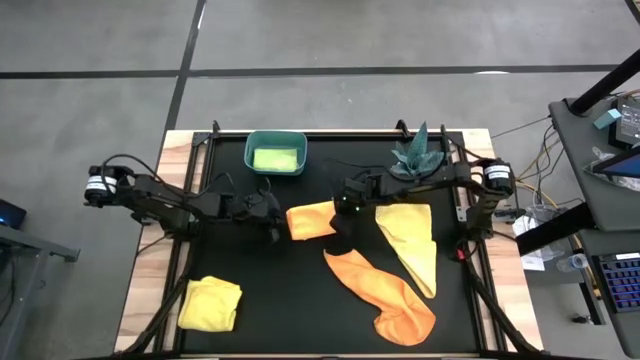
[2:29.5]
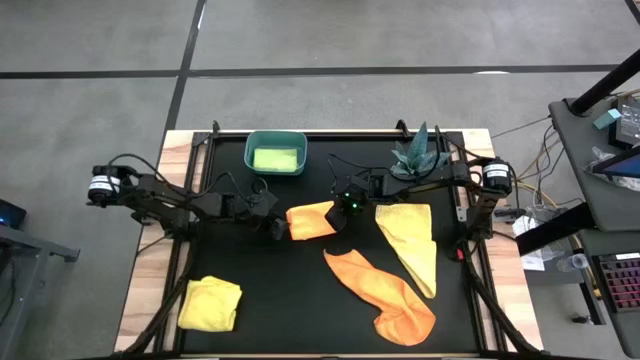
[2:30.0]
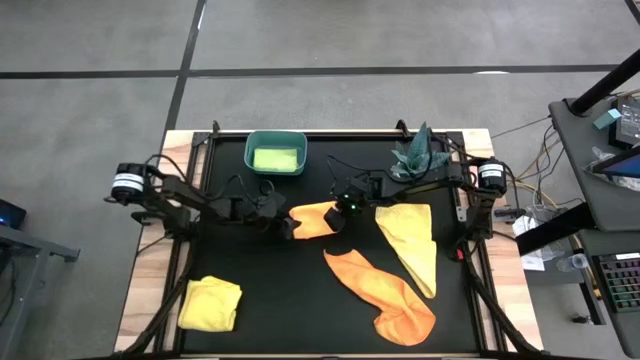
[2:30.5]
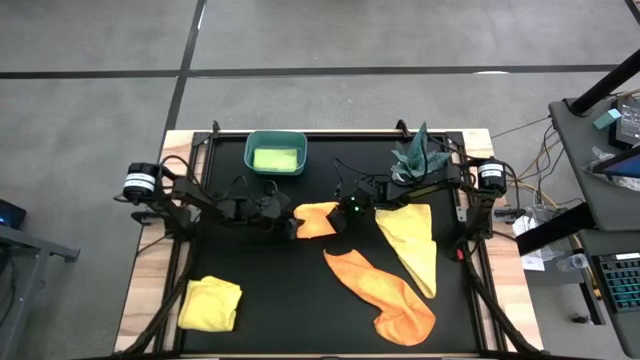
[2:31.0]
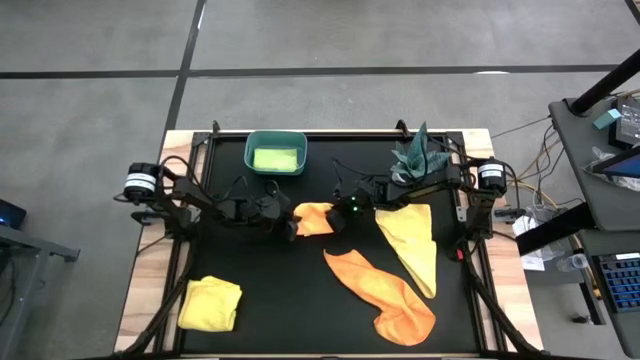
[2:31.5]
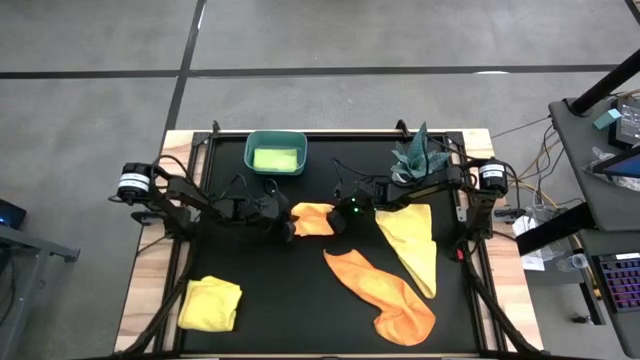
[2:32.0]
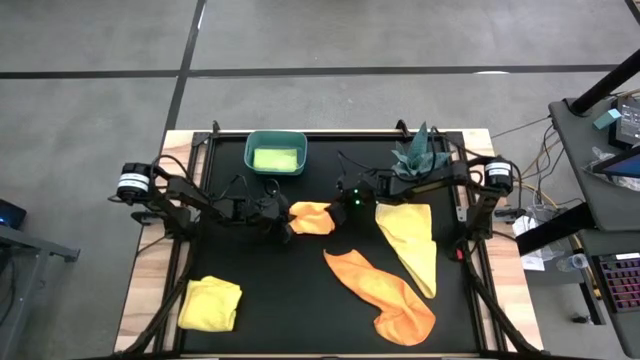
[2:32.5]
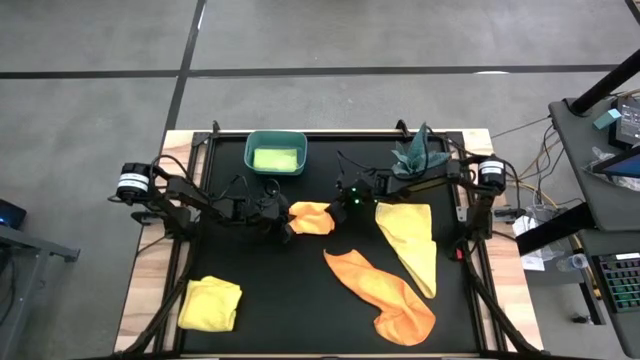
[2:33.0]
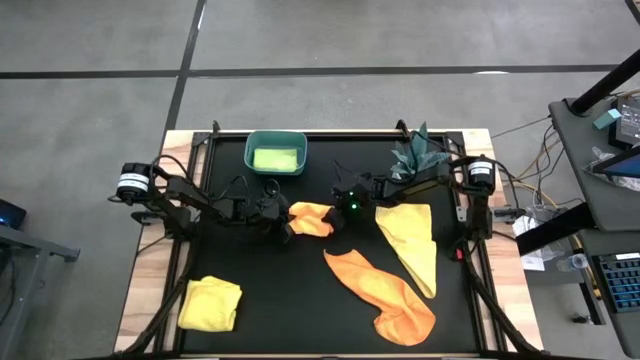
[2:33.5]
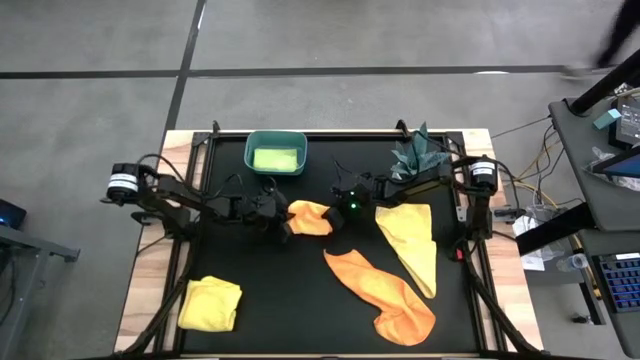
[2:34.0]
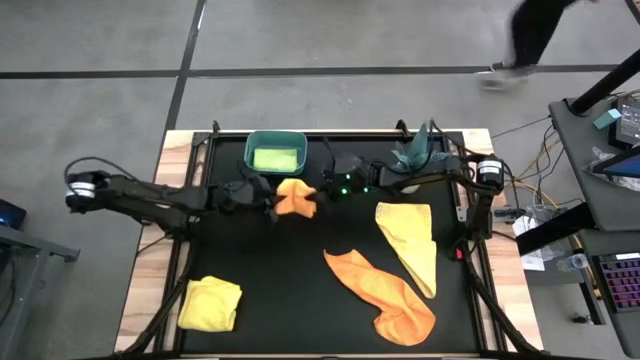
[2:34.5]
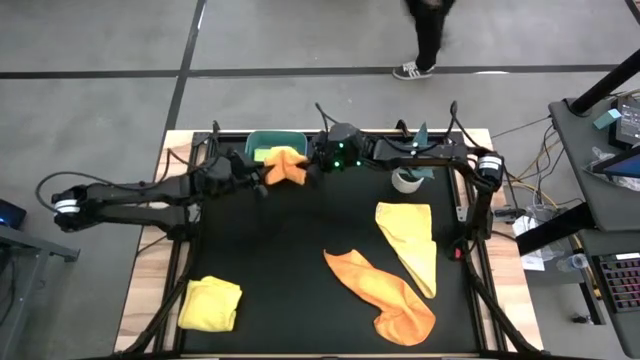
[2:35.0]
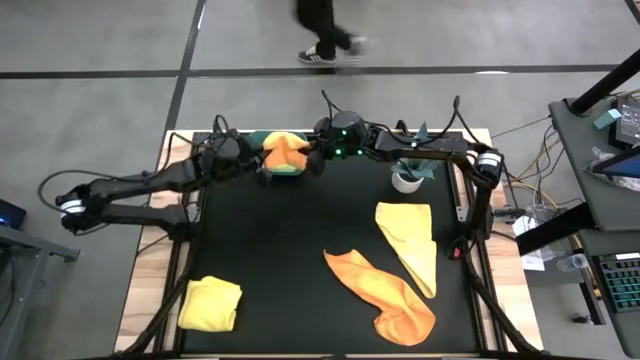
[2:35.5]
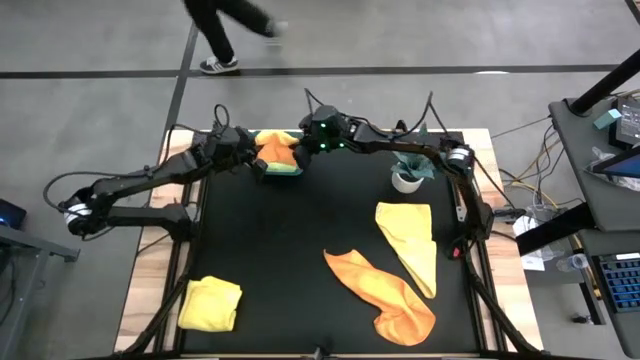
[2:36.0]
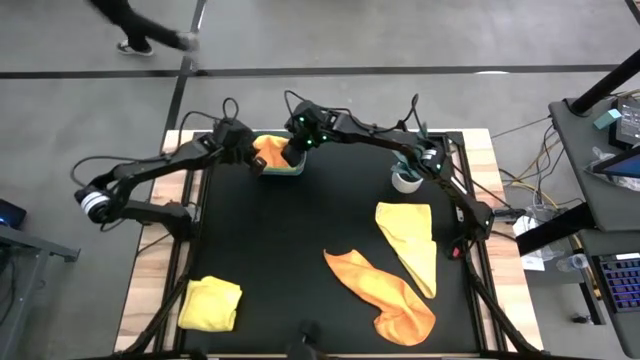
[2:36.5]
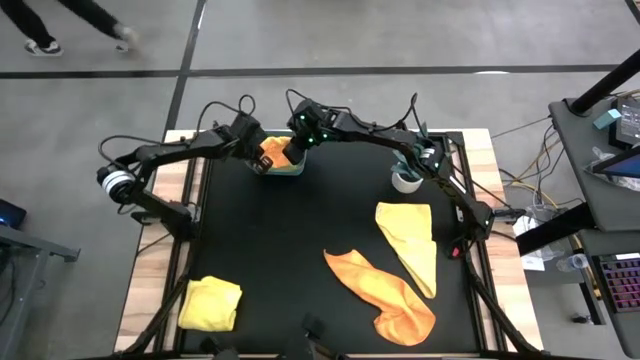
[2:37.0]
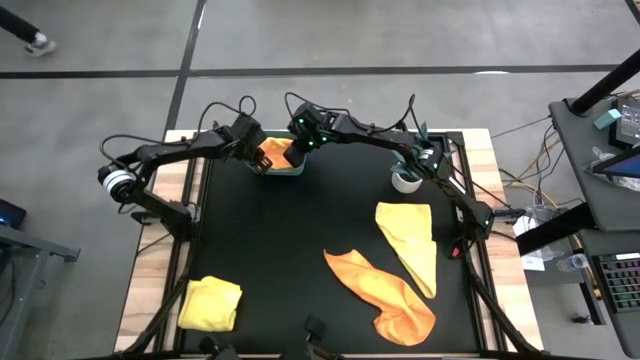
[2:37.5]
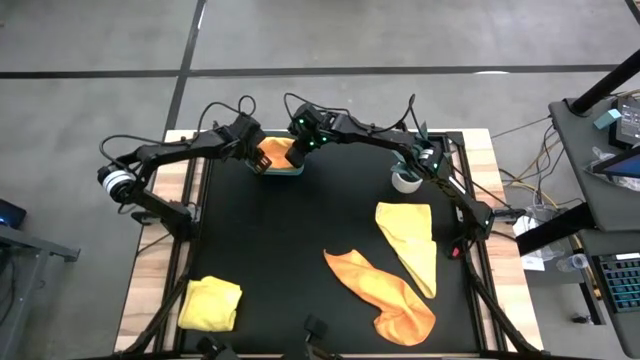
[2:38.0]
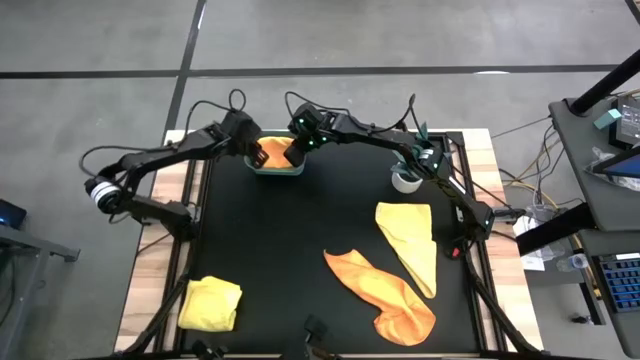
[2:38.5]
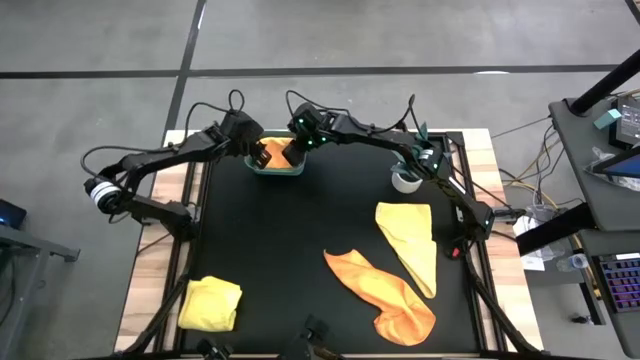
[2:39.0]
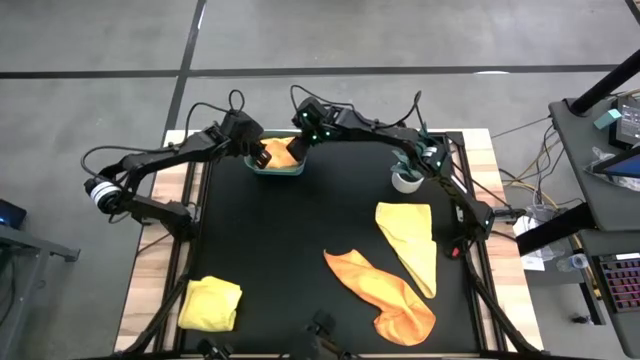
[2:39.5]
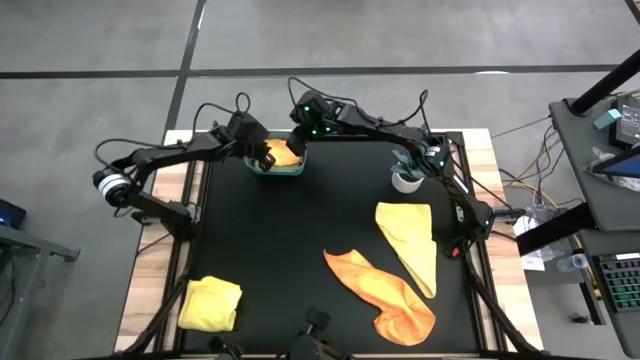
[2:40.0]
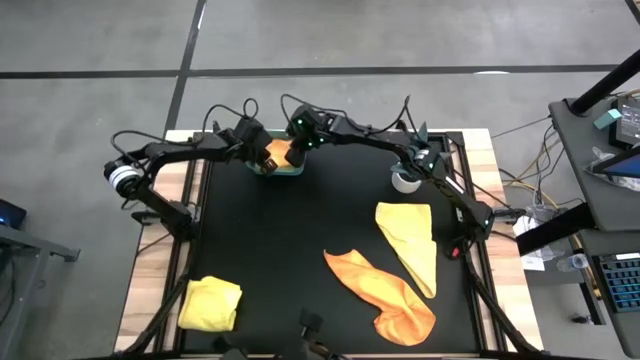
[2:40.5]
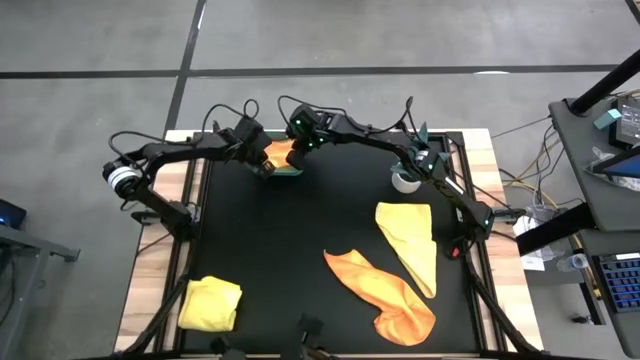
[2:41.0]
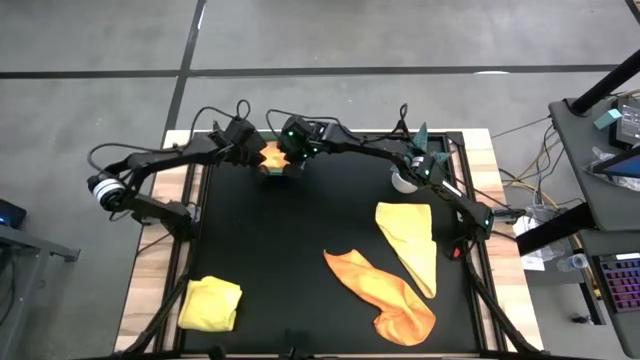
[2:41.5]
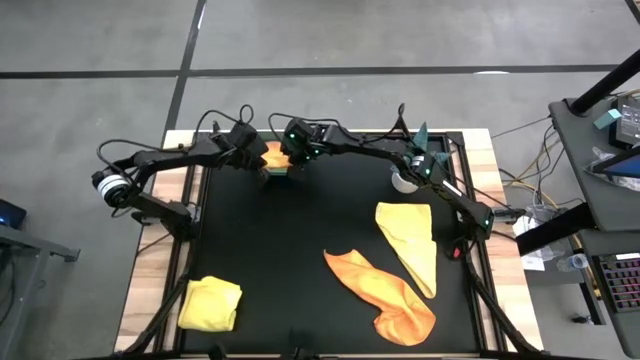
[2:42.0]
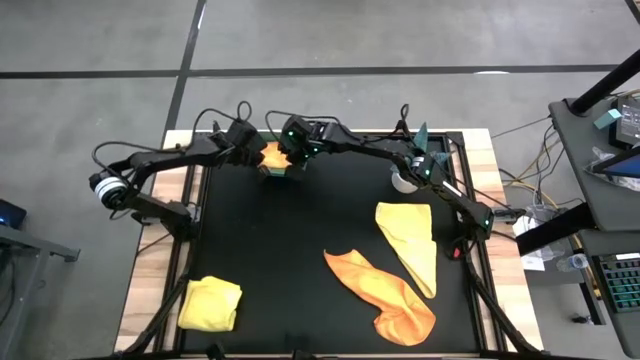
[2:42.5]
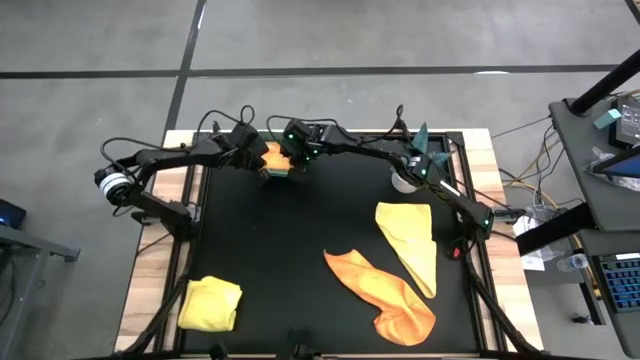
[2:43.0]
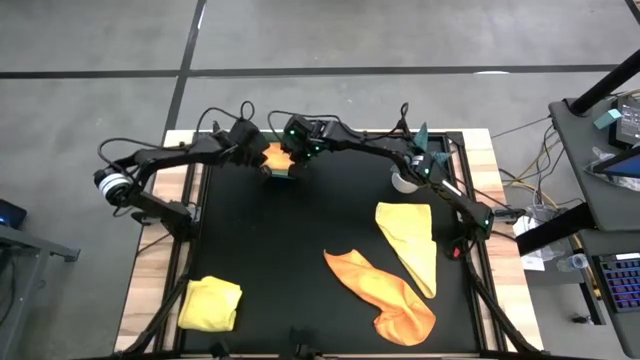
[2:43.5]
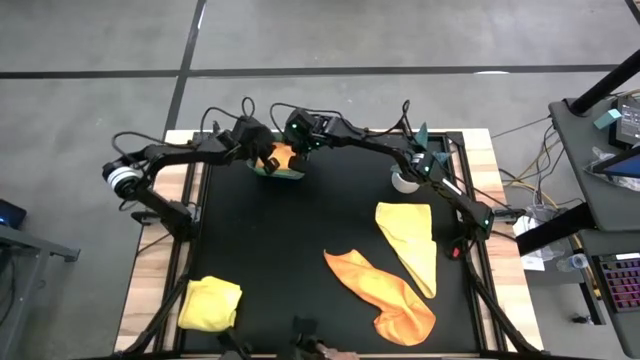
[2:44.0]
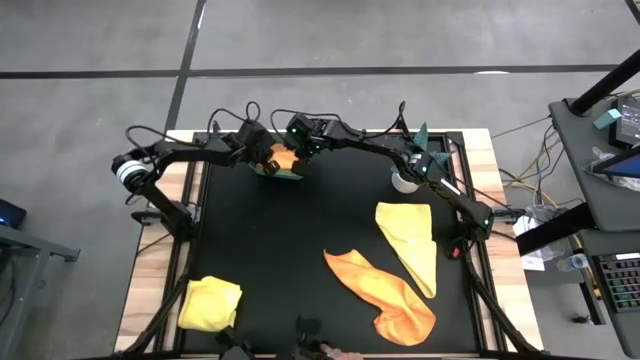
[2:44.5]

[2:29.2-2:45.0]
Task: Fold microfiber towels
Put the top orange microfiber cloth into the blue bin

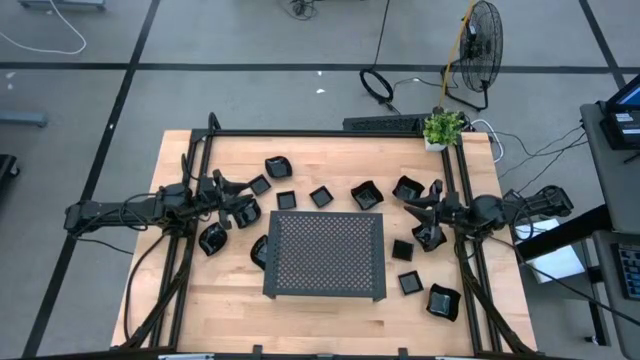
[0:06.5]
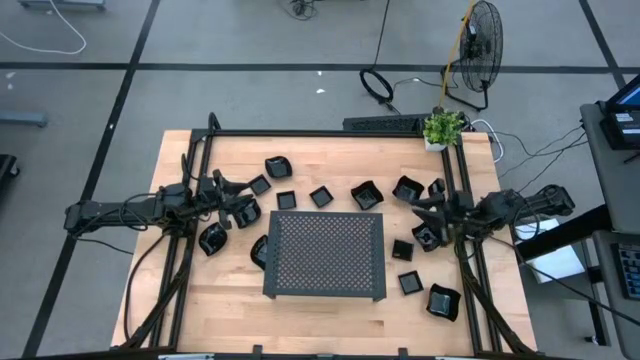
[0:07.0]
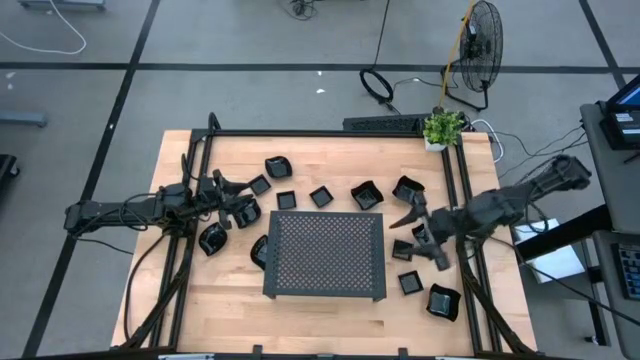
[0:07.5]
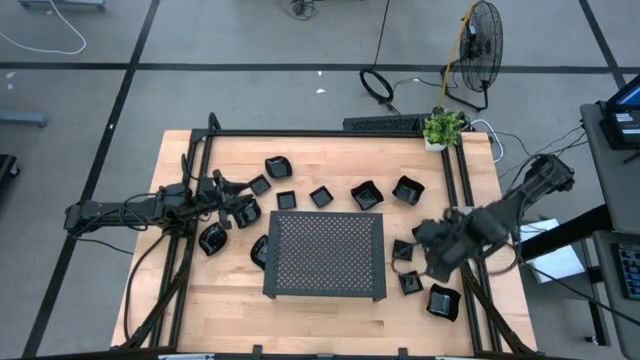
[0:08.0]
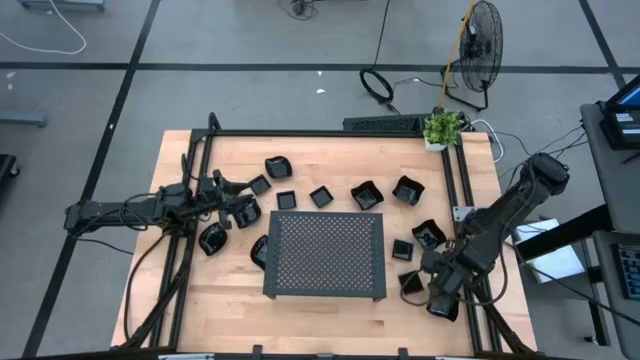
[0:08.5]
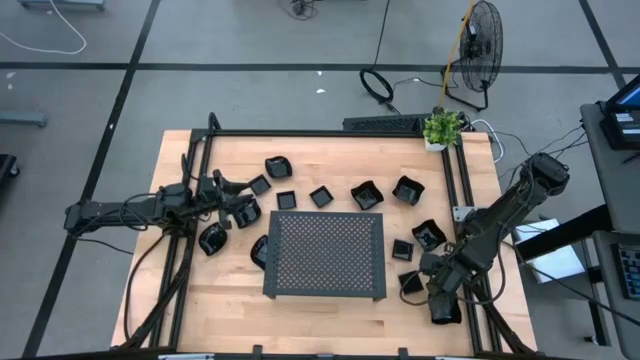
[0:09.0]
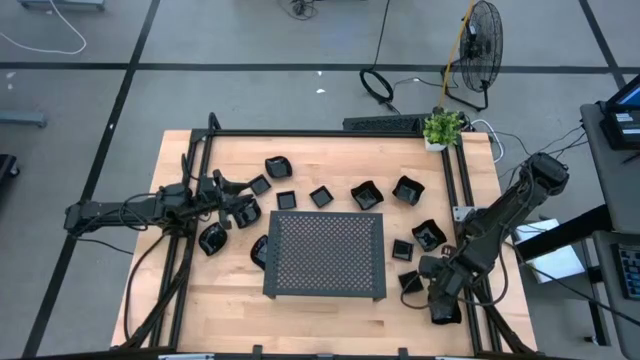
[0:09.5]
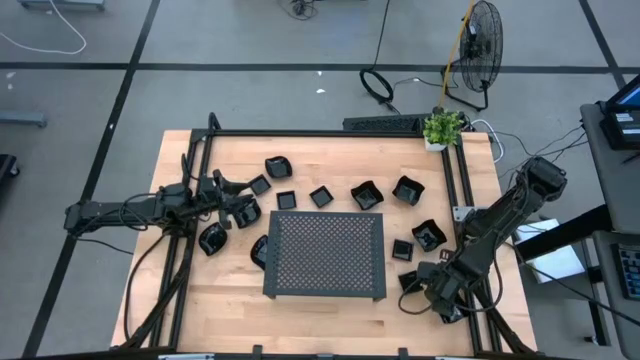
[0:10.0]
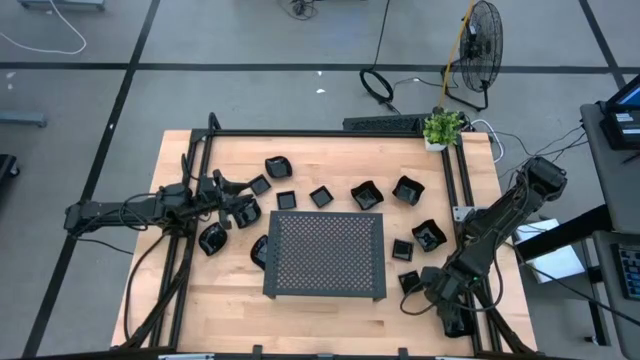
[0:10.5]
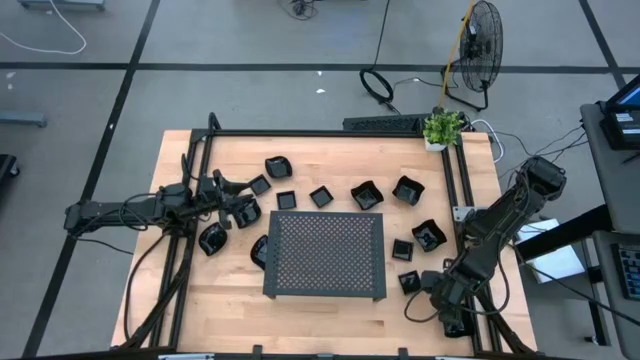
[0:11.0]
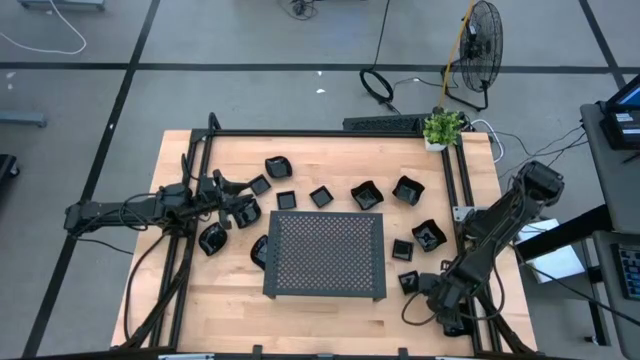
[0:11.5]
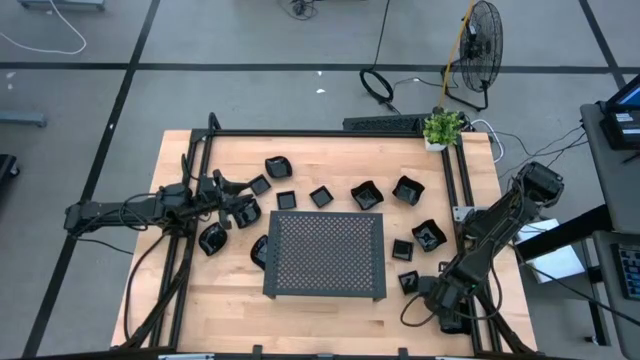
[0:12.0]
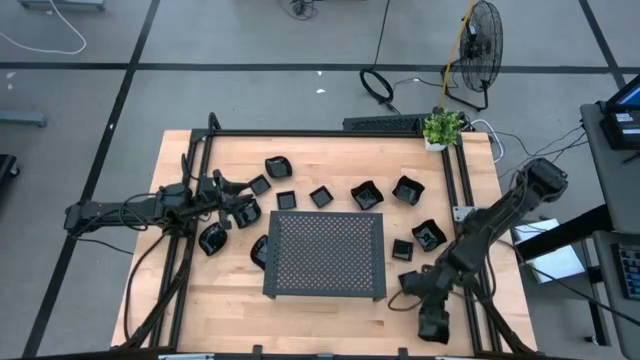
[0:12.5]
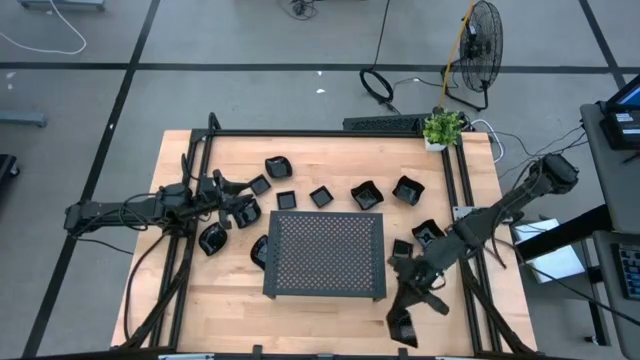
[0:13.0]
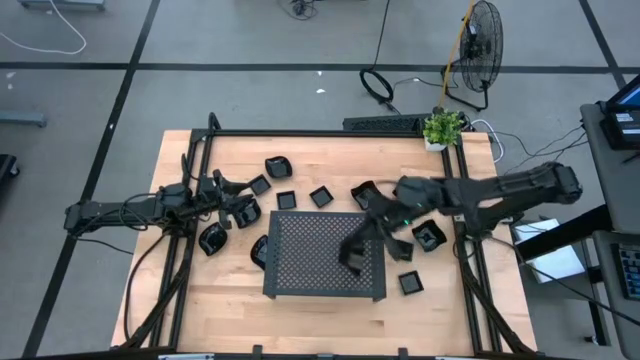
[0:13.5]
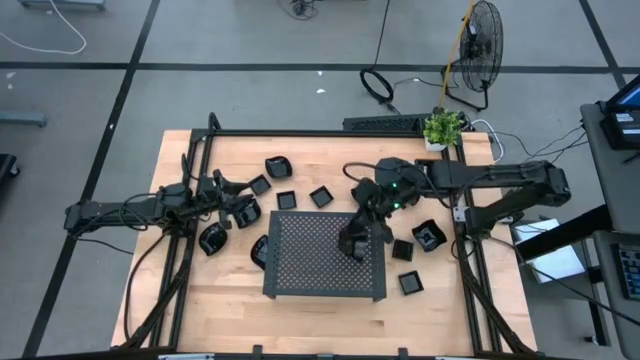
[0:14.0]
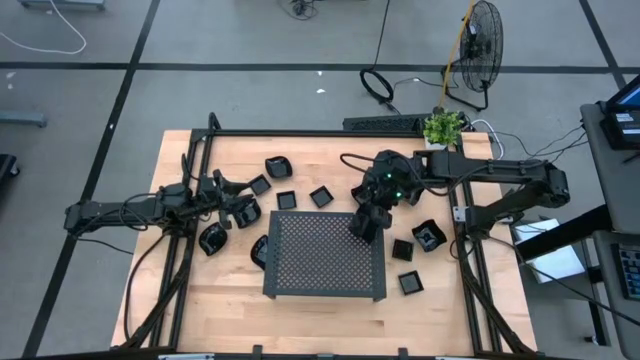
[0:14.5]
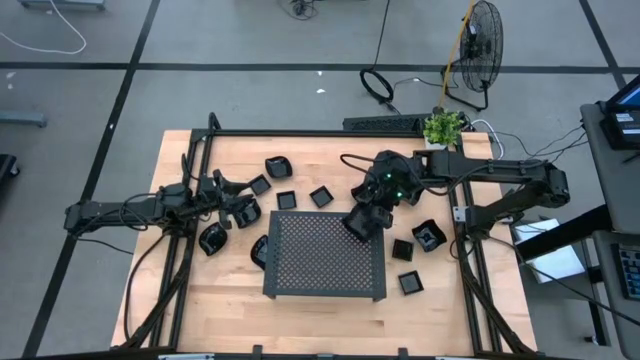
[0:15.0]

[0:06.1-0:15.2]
Task: Pick & Place Mini shaped plates
Put the black distorted square plate on the shelf
